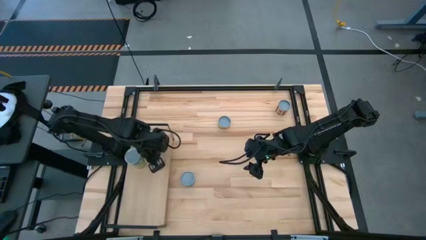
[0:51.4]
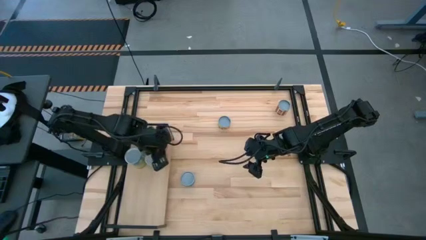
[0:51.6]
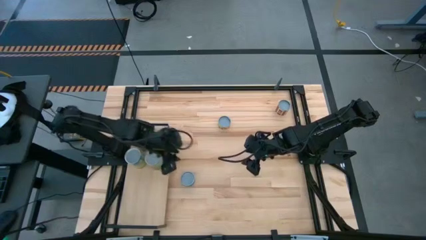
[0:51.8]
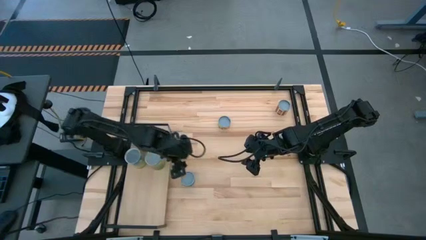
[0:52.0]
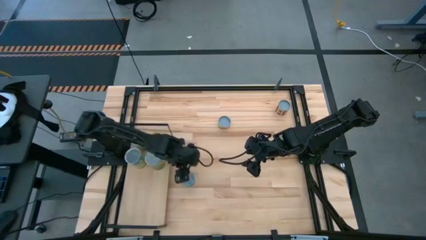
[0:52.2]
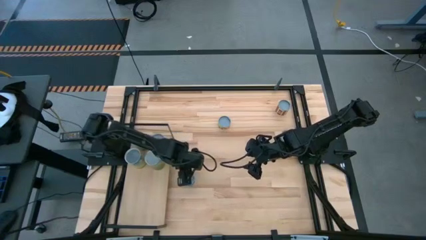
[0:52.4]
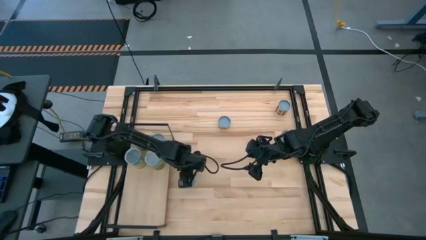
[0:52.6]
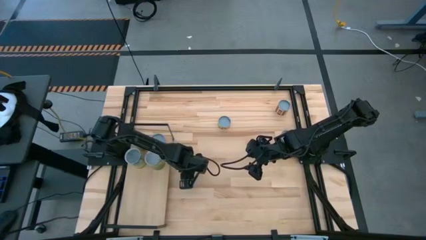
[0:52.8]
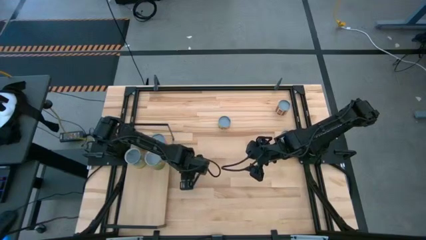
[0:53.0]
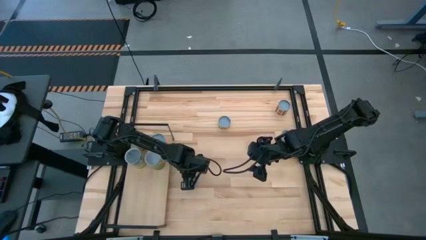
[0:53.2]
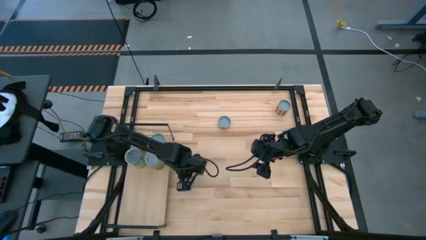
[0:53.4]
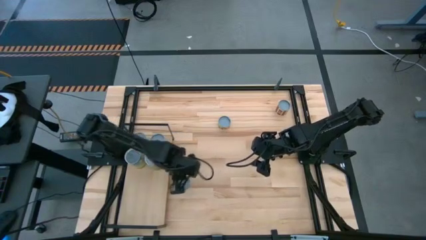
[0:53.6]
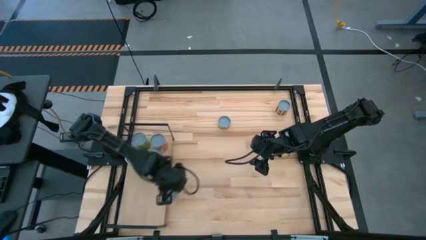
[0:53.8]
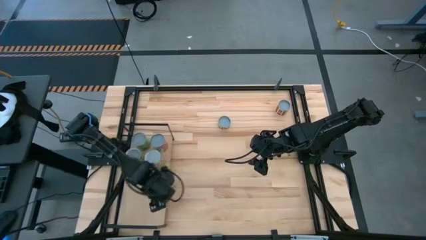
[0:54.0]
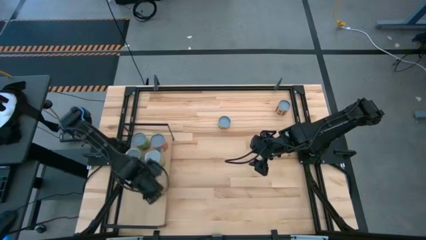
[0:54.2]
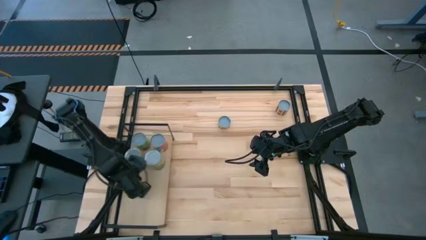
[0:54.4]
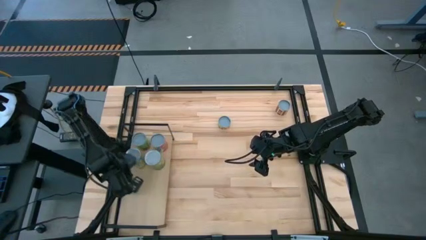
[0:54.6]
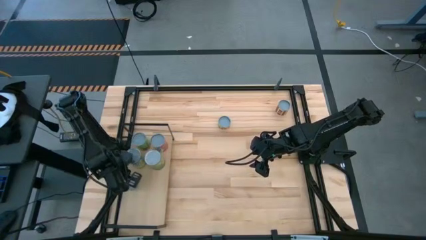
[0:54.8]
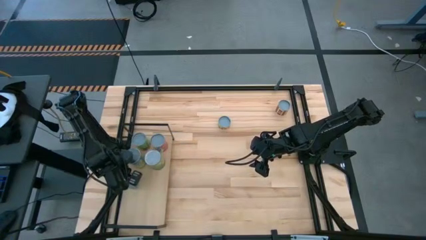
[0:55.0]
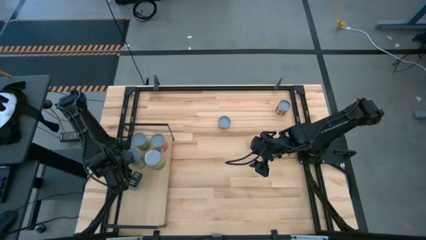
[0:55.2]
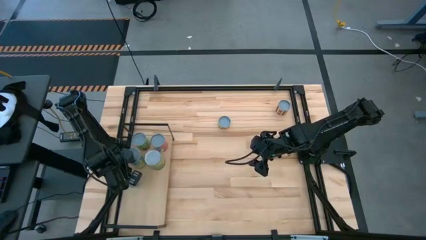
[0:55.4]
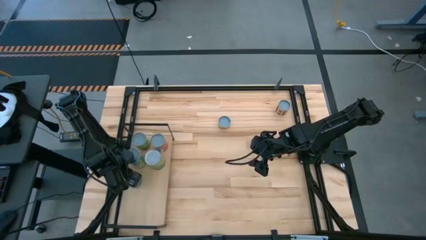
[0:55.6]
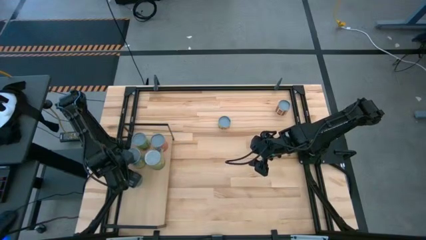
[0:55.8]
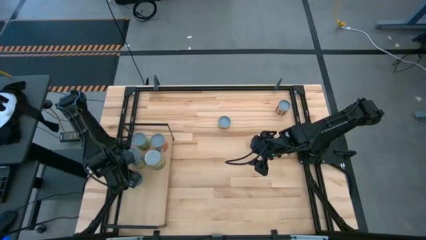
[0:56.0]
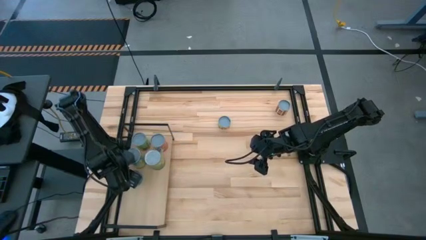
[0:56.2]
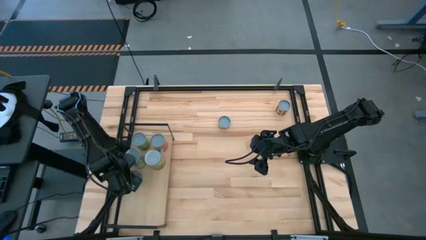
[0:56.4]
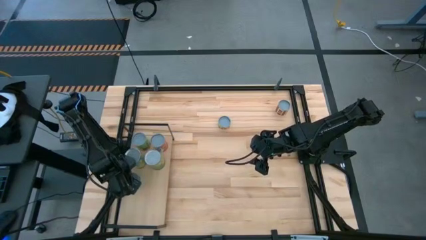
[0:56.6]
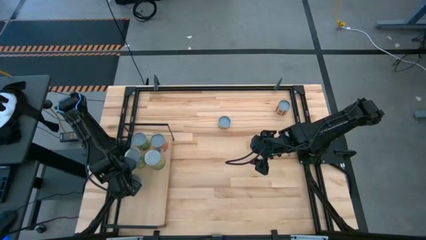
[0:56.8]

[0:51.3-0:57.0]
Task: Pick and place cans onto a shelf
Put the canned tuna on the shelf

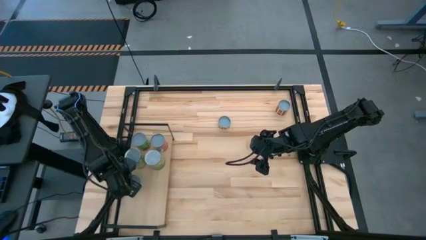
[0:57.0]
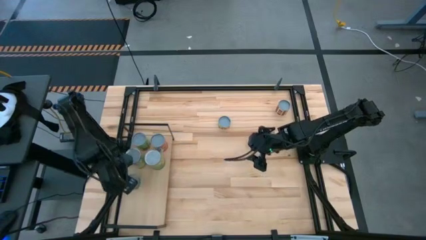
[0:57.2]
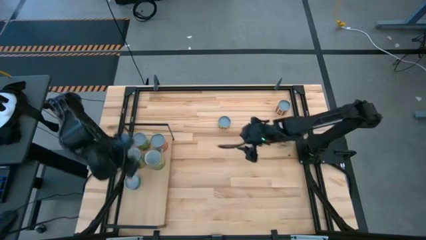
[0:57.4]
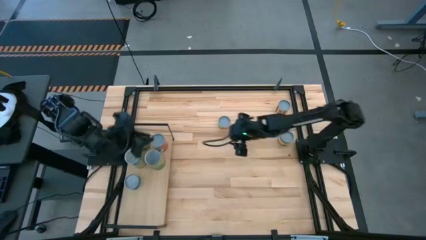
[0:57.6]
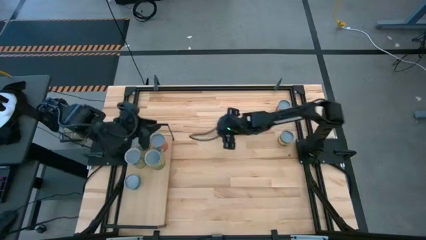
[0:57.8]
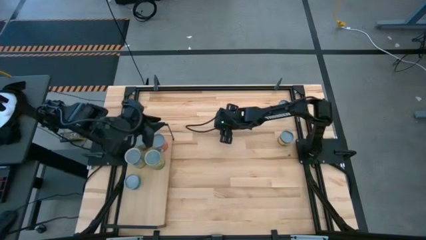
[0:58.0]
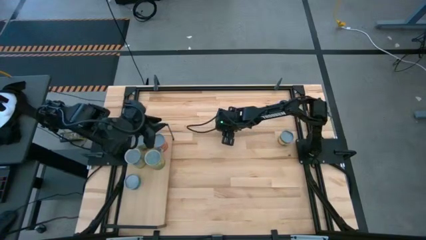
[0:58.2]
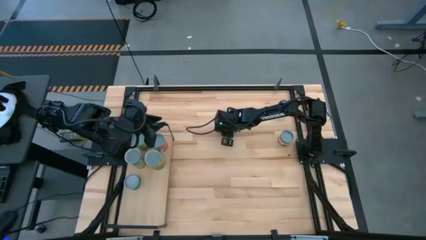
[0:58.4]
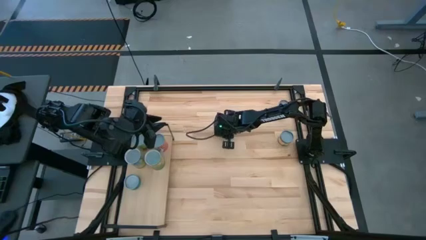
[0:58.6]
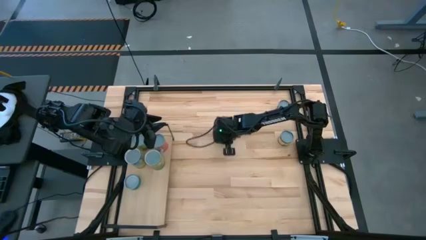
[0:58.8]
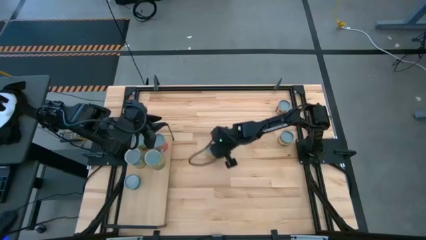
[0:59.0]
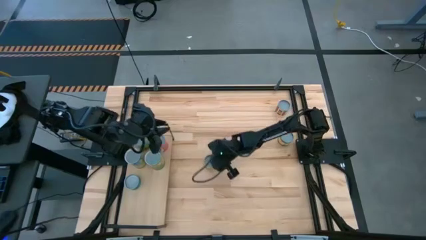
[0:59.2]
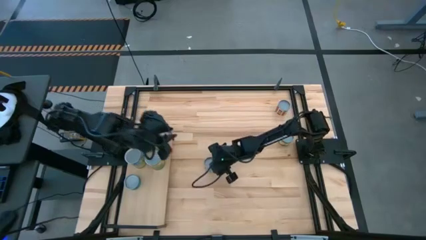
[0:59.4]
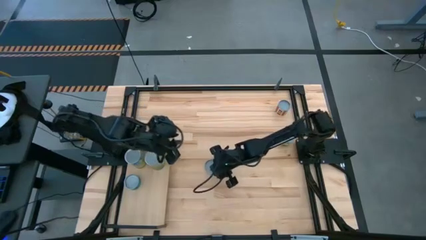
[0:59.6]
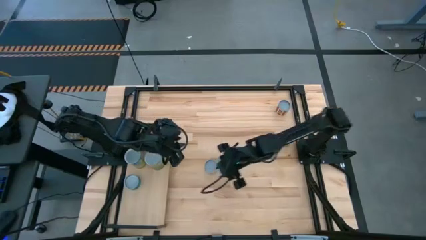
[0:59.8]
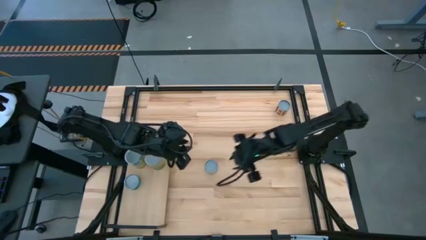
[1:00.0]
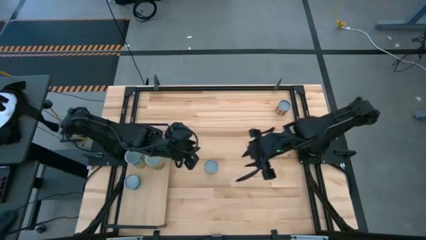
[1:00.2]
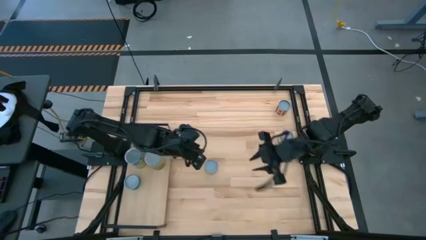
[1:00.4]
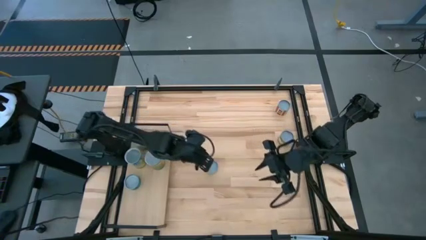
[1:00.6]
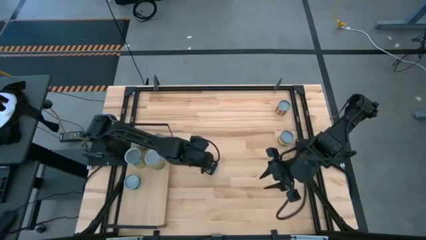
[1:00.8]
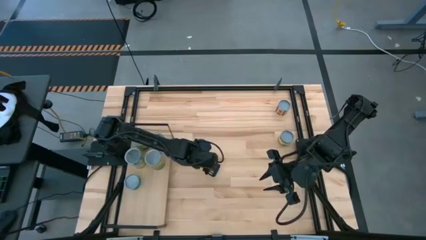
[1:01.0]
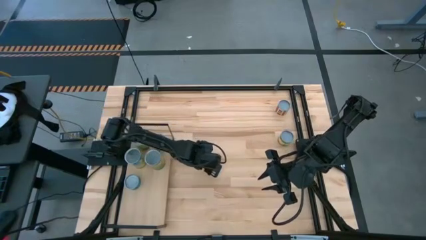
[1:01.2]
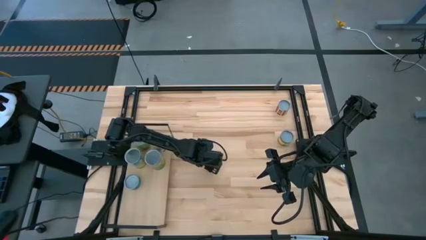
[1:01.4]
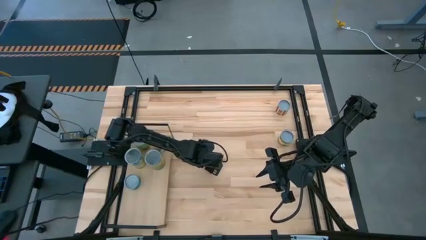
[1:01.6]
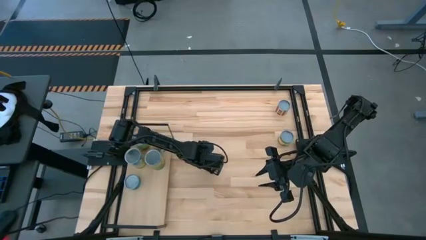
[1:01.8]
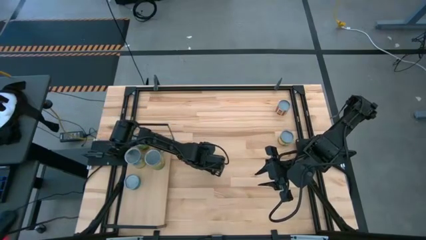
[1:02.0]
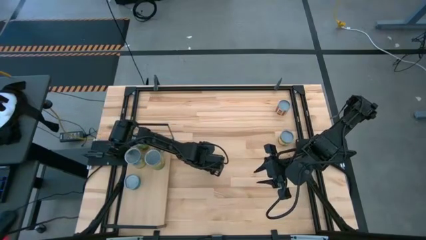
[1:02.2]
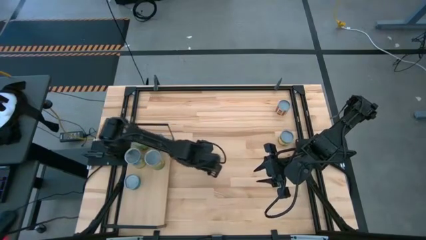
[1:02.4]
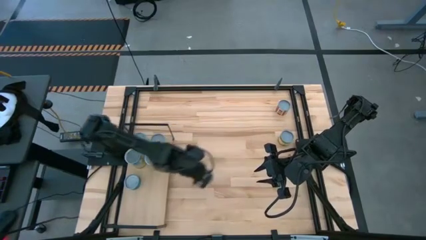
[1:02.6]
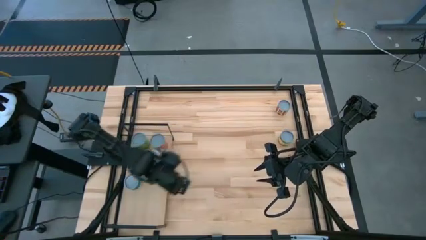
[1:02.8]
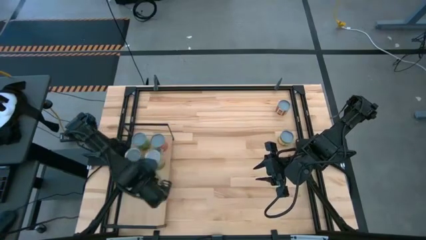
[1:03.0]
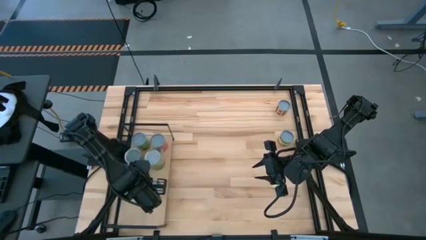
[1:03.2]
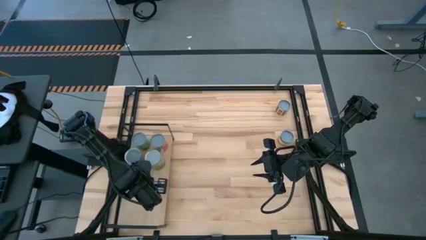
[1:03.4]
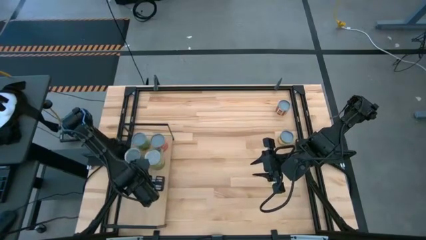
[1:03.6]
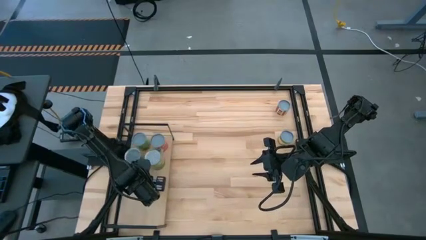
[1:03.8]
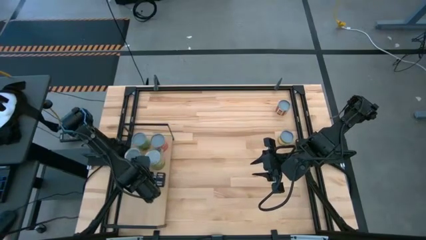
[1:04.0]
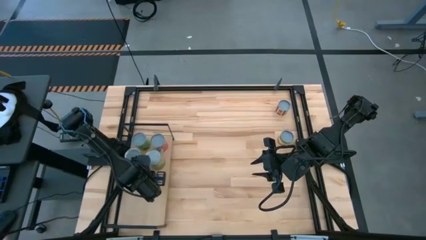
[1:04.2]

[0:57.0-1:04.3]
Put the canned mushroom on the shelf

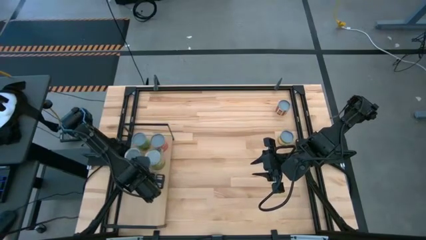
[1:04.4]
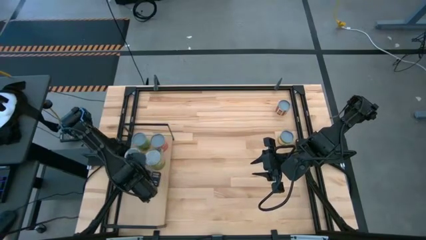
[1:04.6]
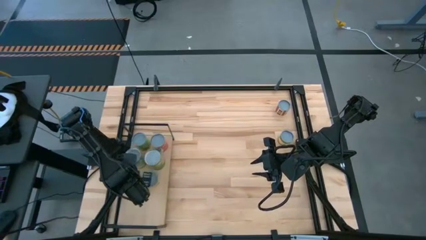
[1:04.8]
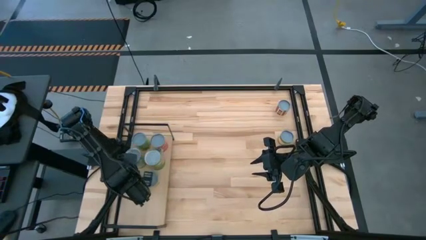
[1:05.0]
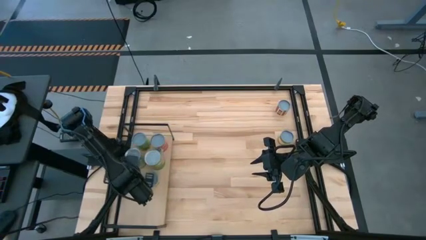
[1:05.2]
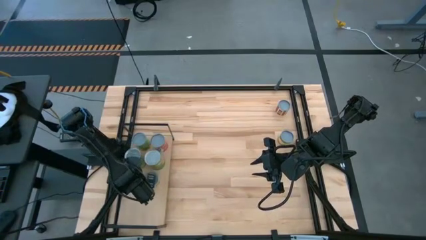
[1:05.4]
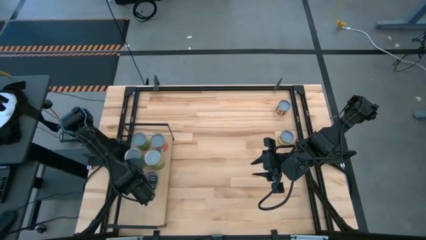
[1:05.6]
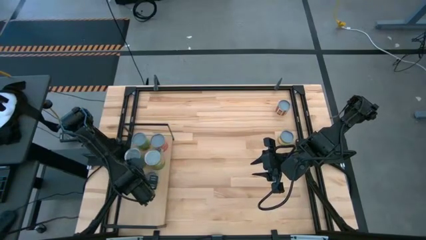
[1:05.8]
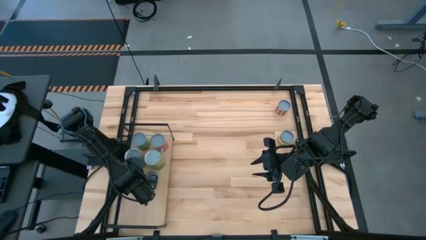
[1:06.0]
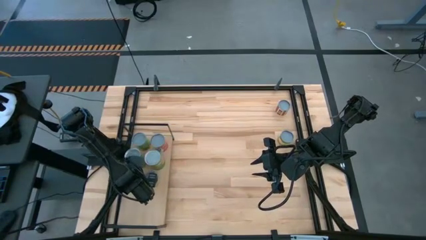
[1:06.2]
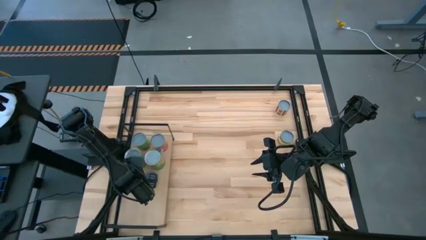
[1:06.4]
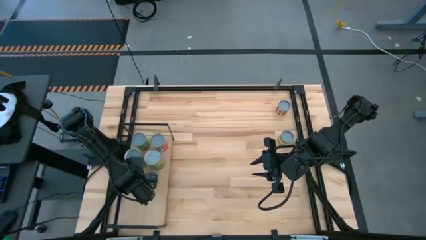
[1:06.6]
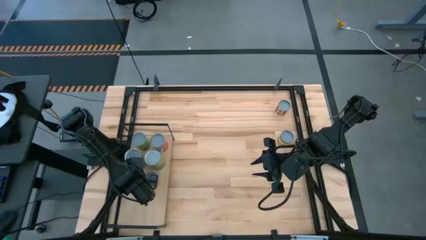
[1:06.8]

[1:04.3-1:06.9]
Adjust the canned tuna on the shelf

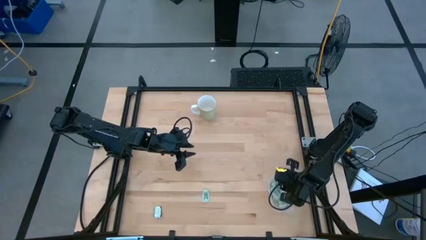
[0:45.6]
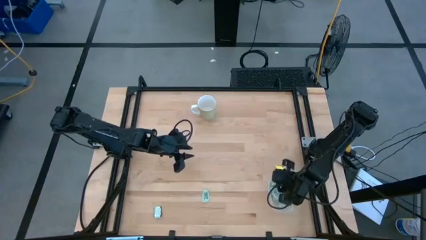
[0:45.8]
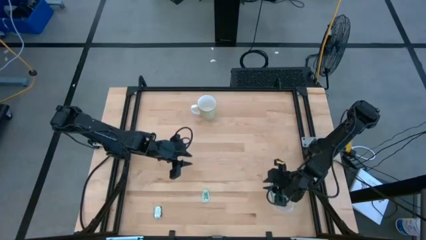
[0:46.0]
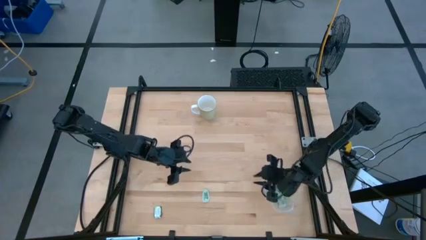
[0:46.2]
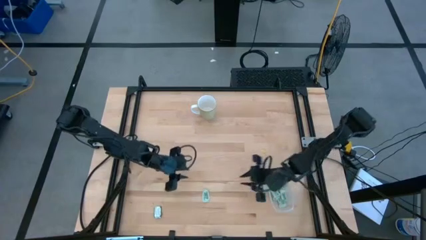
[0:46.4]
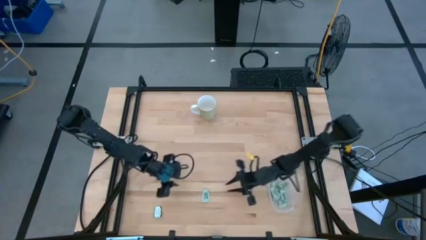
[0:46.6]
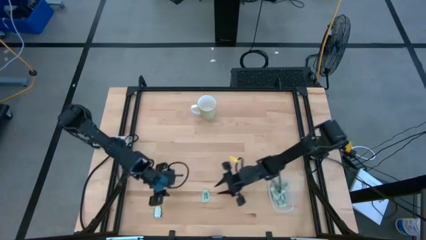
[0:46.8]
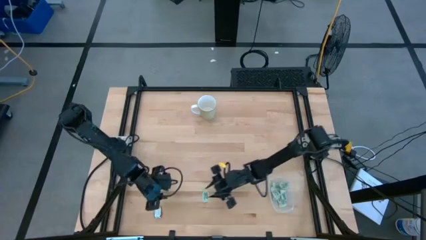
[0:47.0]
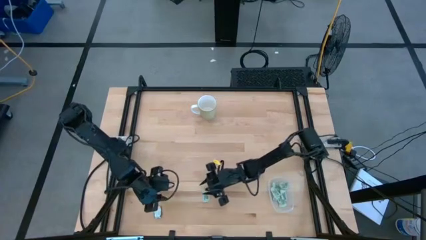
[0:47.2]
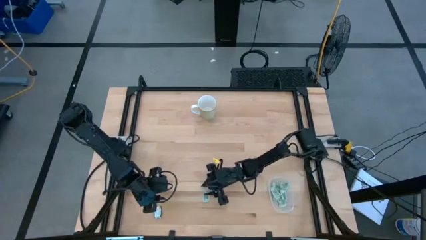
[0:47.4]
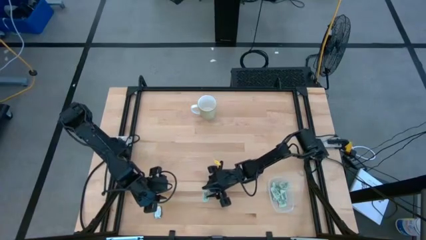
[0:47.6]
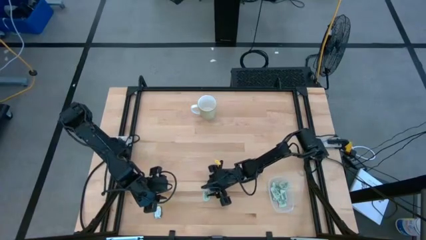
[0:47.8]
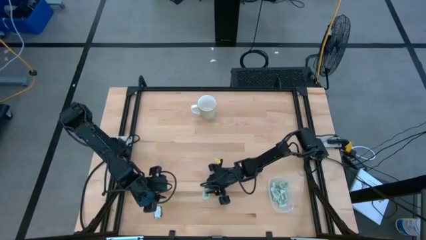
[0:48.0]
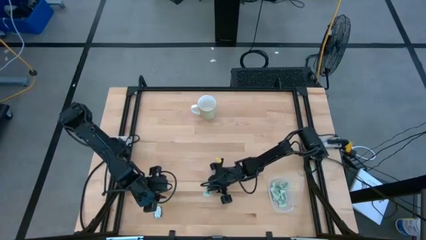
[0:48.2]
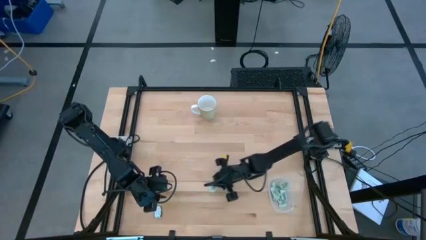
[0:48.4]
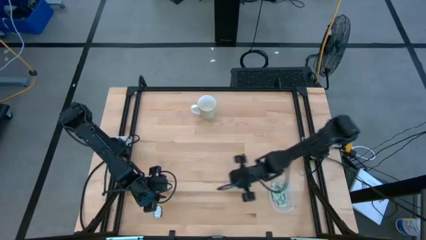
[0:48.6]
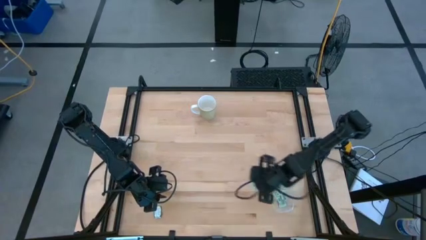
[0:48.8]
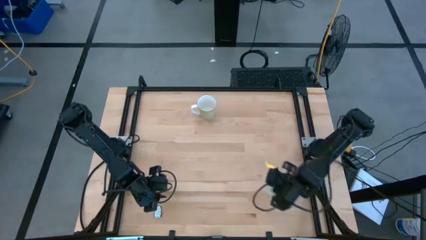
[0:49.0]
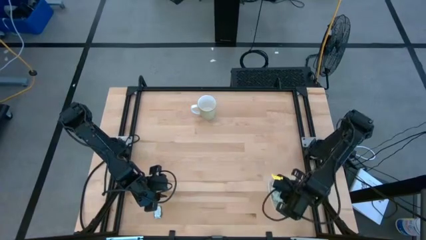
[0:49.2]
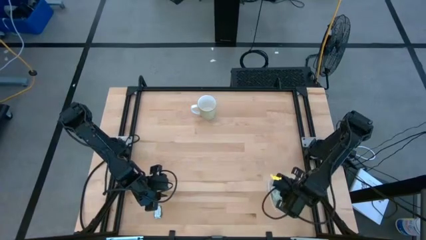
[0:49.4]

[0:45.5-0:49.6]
Task: Pick and place Stevia / Truvia into bins
Put the stevia packet into the transparent bin
